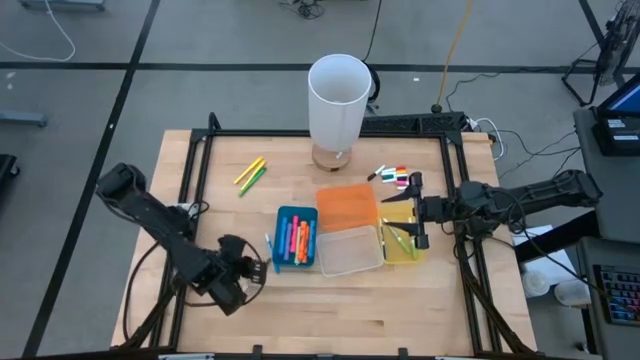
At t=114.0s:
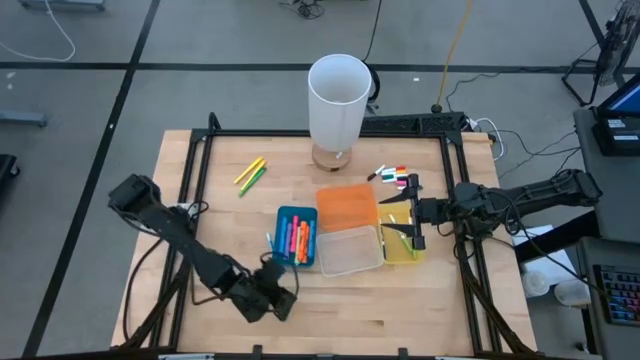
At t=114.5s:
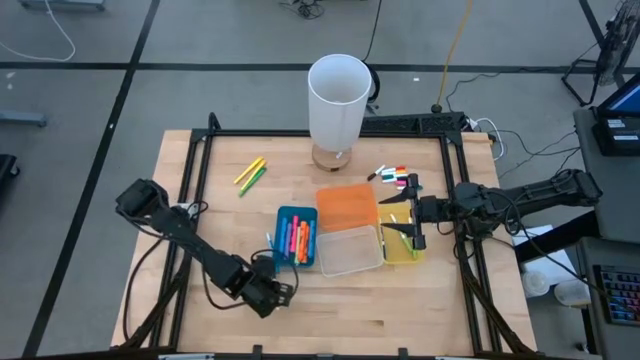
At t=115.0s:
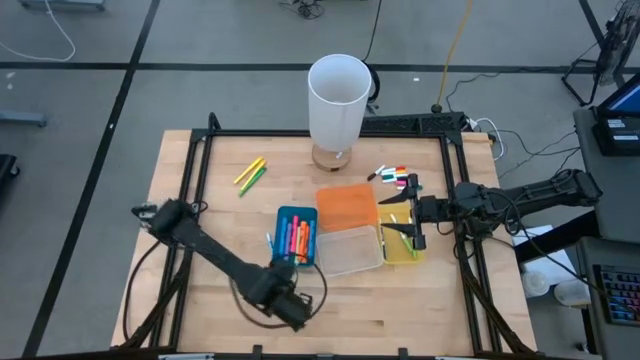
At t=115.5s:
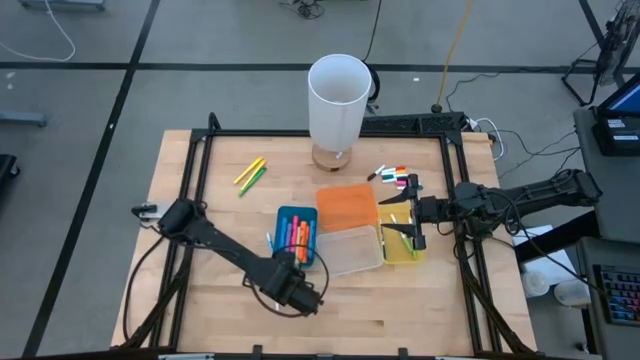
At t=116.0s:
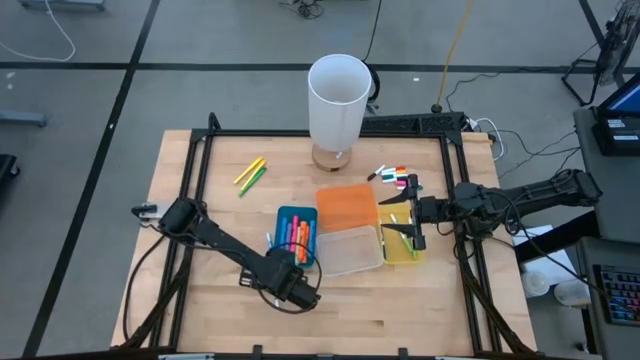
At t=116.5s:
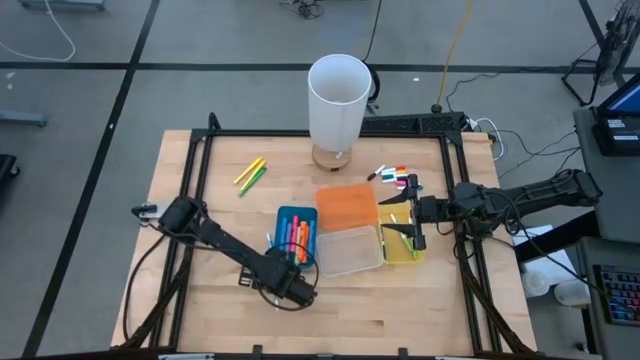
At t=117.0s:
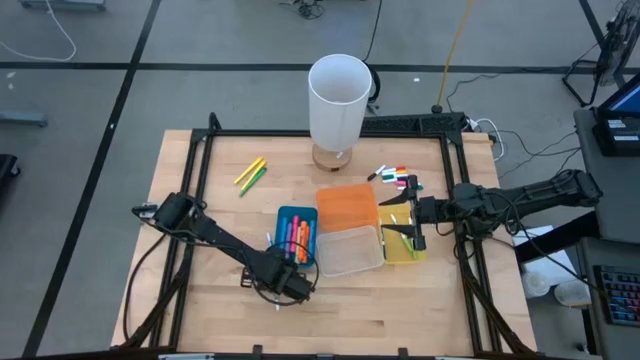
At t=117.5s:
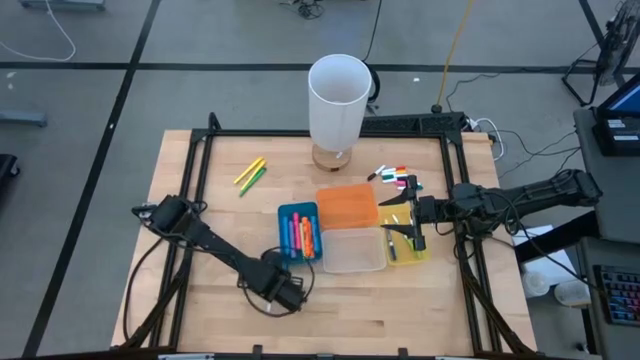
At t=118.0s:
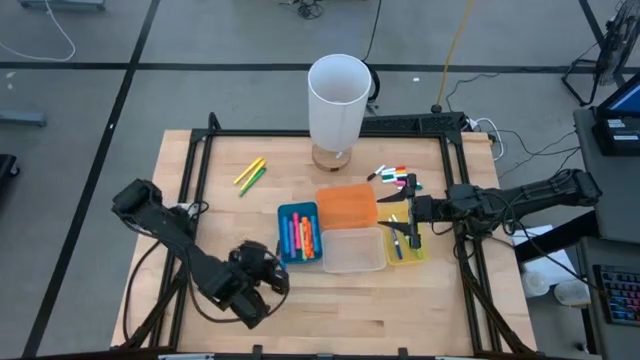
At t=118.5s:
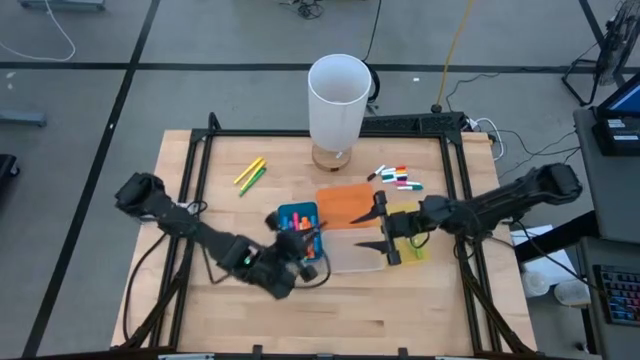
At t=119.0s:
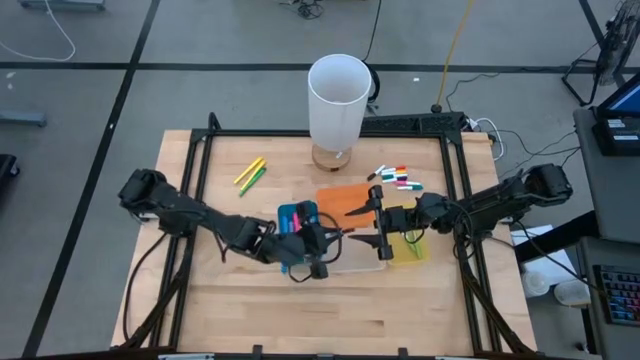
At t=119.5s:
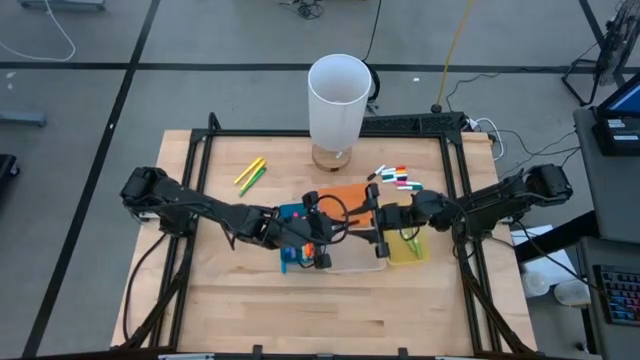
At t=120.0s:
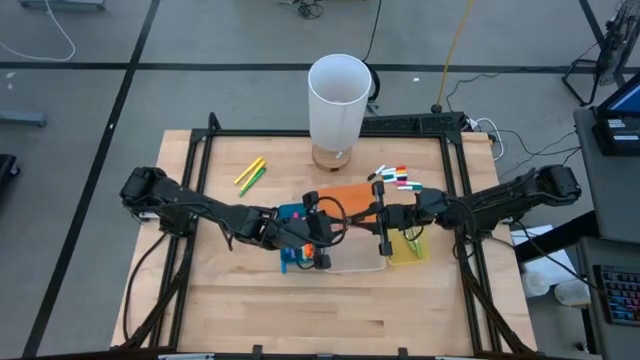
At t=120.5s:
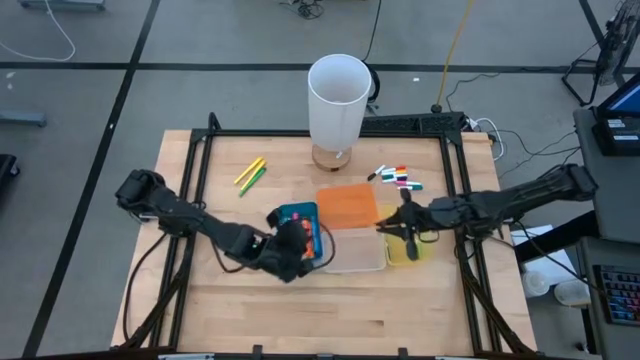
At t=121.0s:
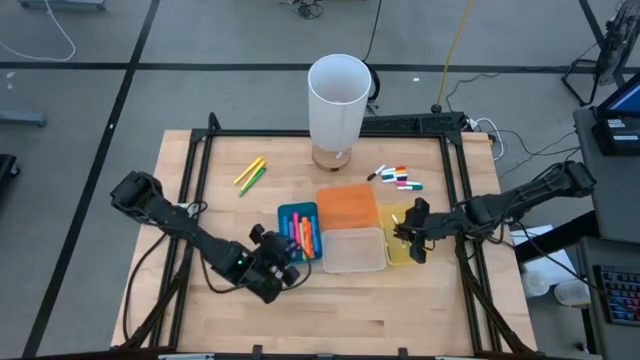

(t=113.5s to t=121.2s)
Task: Pick & Place Markers
Put the brown marker pen into the yellow bin

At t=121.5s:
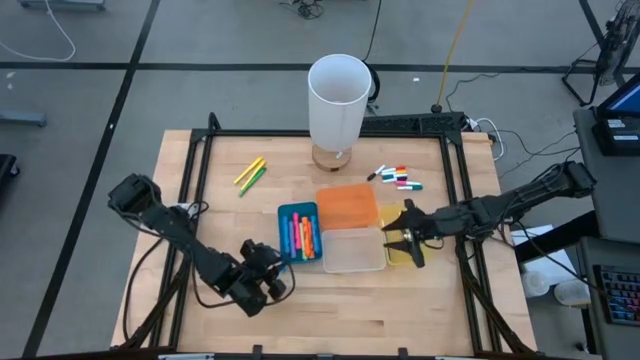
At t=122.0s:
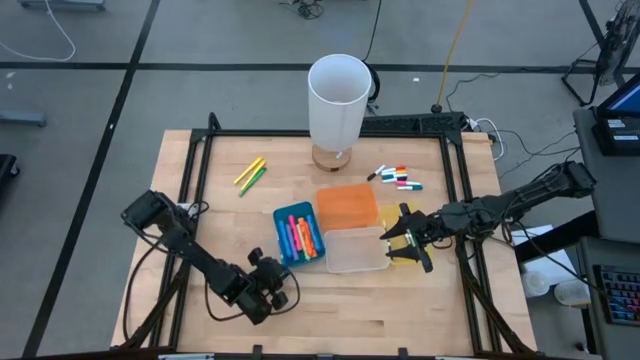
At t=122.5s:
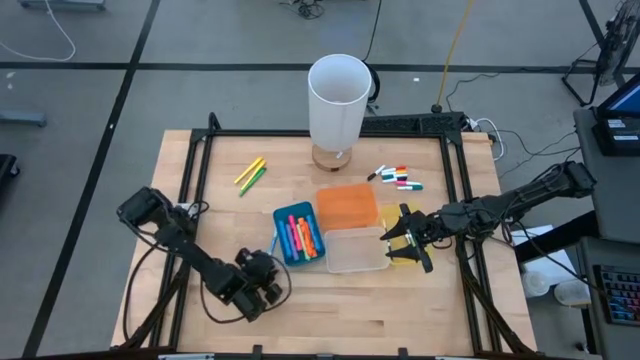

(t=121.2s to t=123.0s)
Put the blue marker pen into the yellow bin

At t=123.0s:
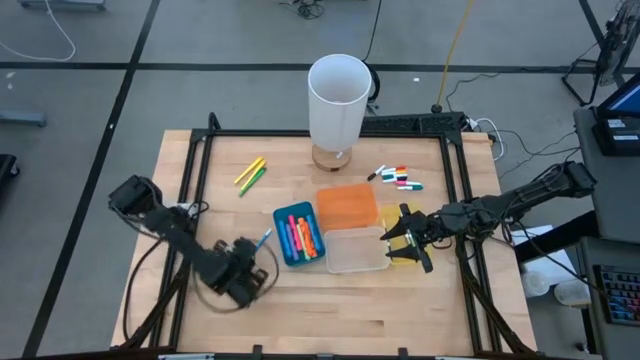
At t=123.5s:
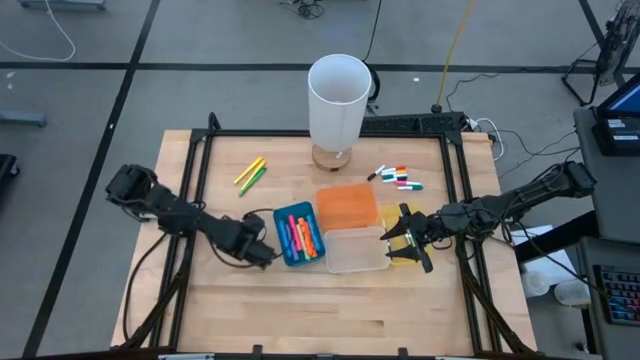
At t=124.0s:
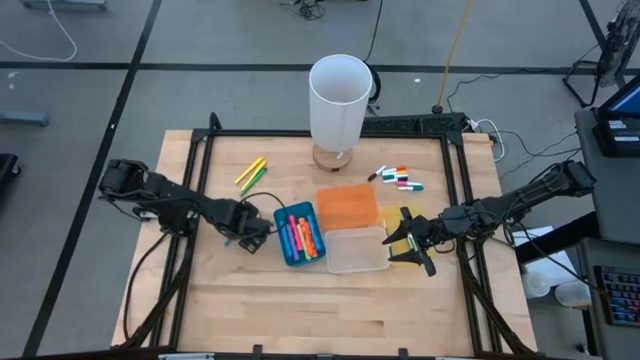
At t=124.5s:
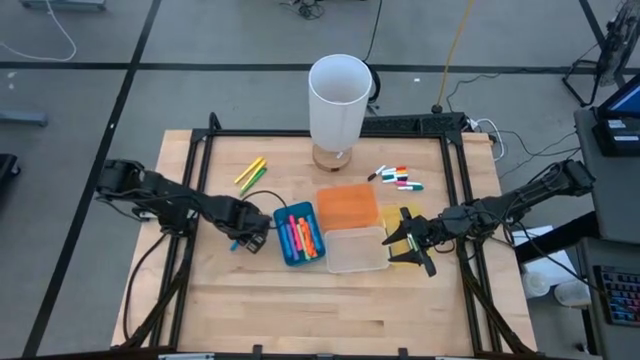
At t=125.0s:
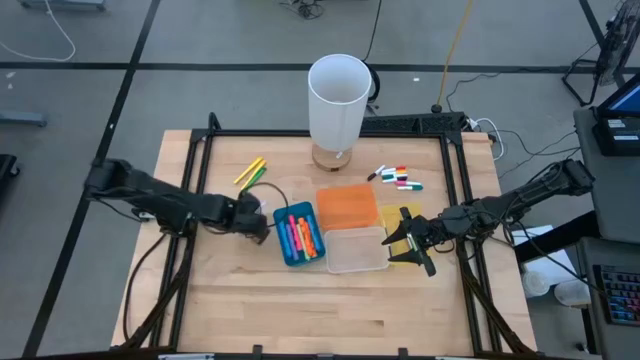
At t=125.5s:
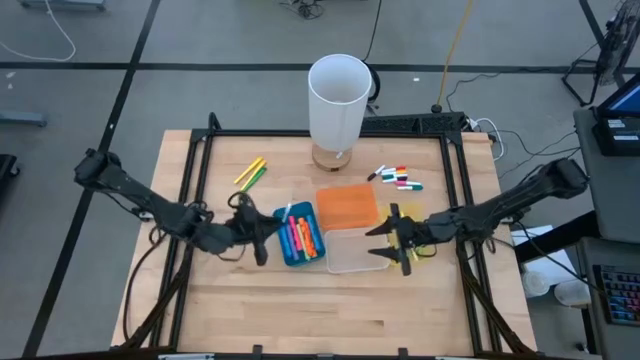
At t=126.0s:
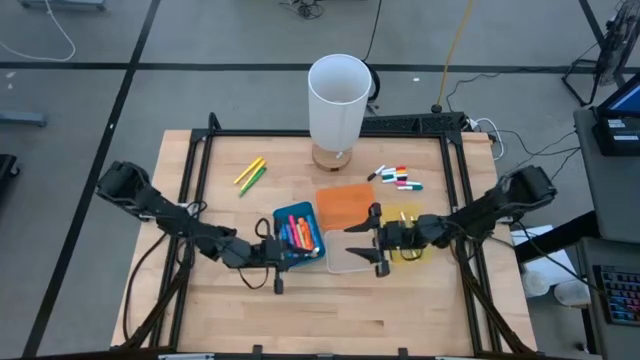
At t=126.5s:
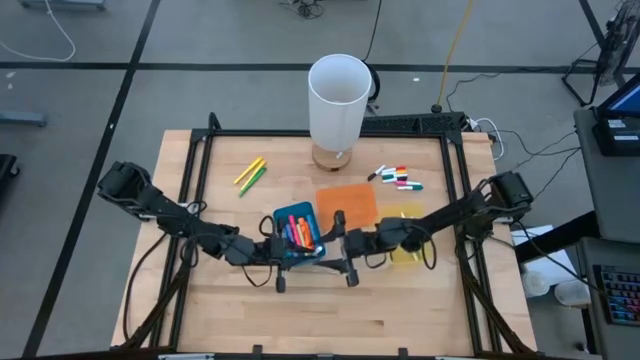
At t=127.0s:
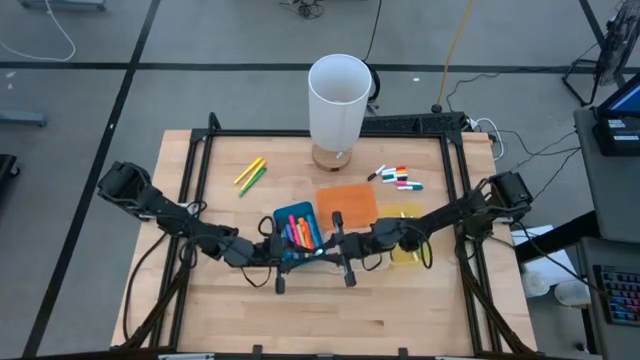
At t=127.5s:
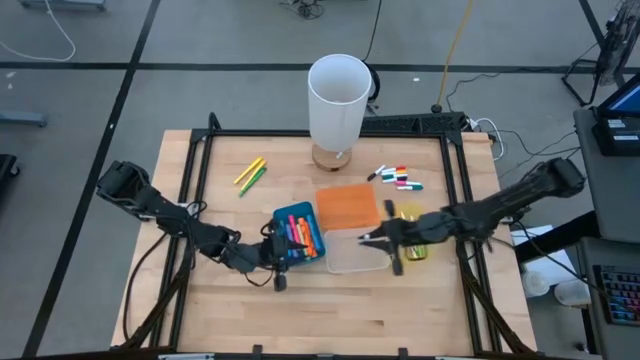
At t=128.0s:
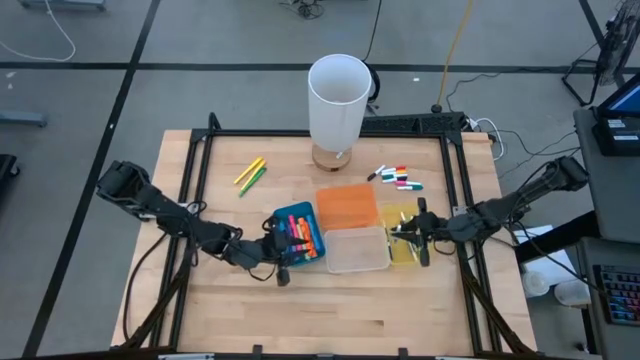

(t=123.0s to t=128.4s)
Put the blue marker pen into the yellow bin

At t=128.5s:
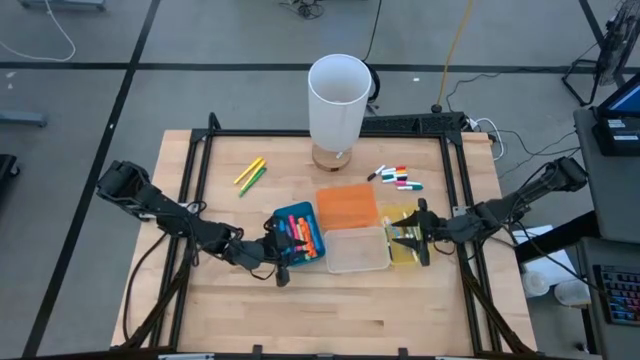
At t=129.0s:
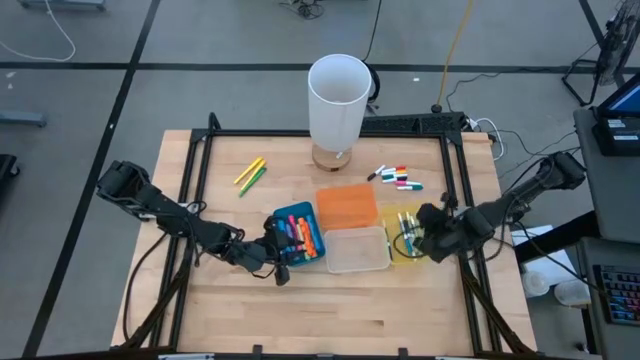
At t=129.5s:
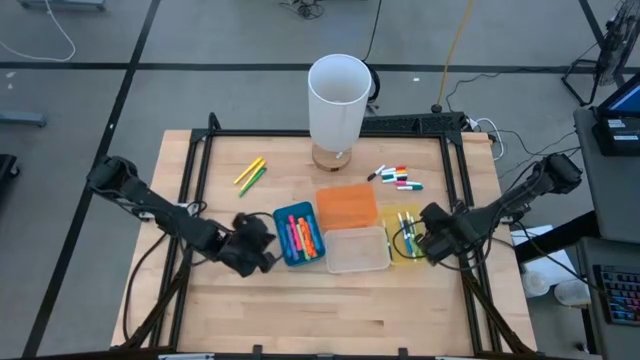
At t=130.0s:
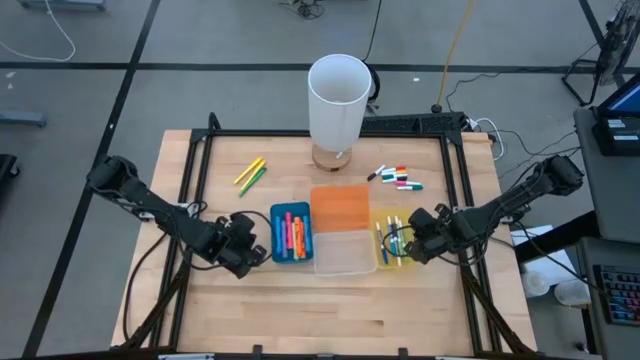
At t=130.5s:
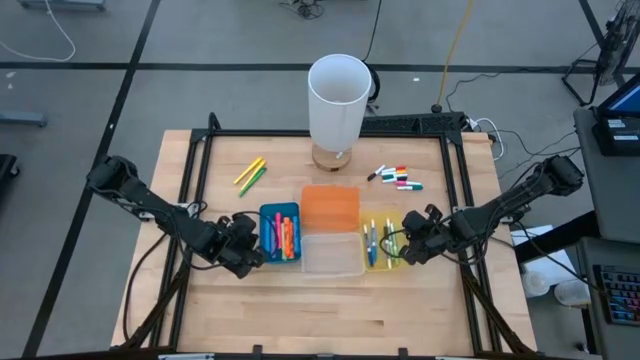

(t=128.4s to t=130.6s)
Adjust the bins on the table

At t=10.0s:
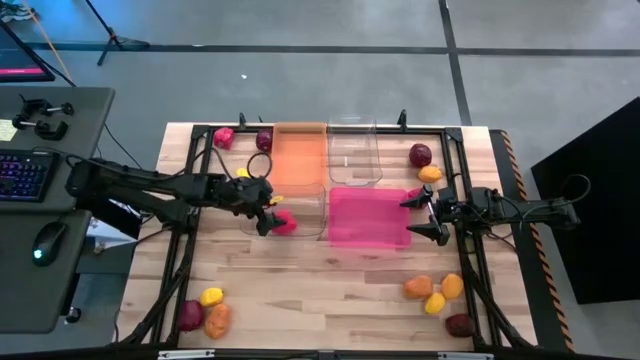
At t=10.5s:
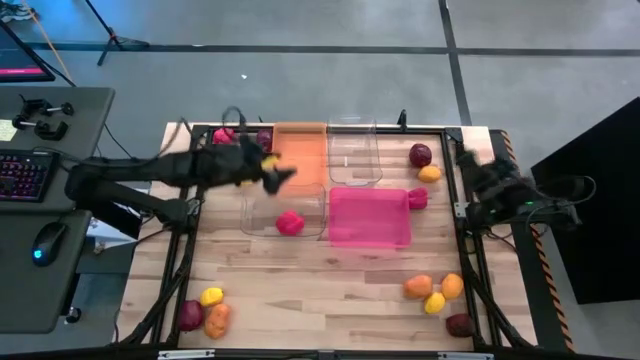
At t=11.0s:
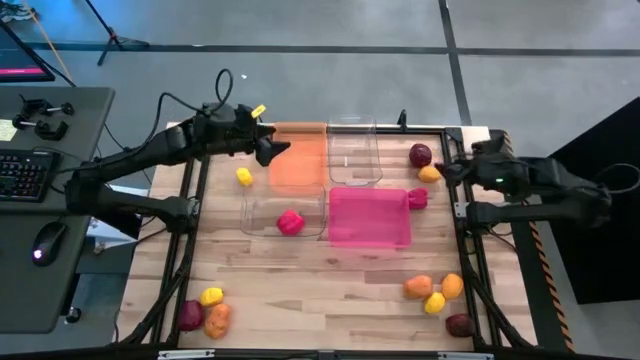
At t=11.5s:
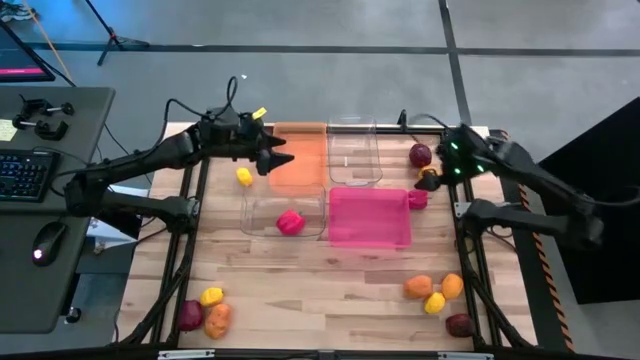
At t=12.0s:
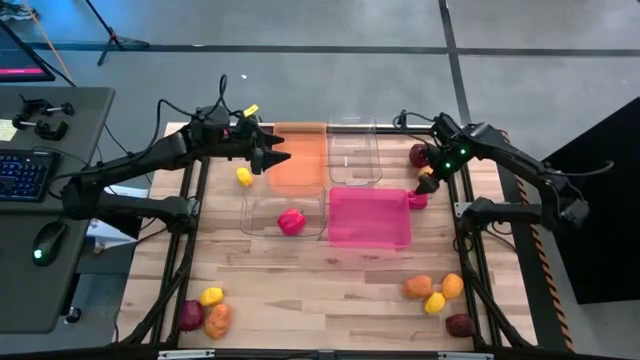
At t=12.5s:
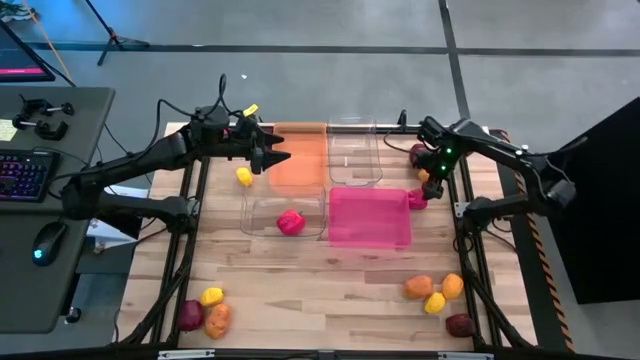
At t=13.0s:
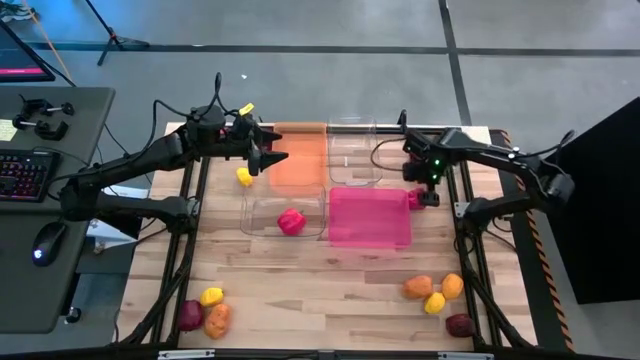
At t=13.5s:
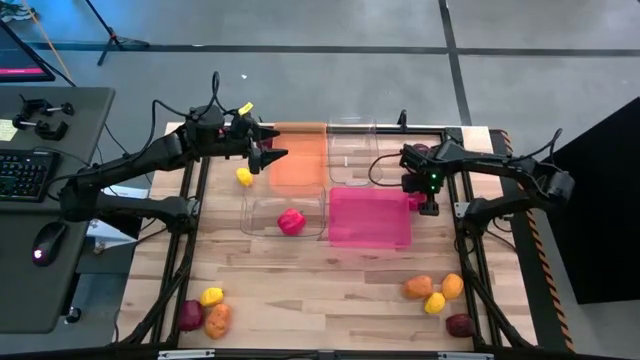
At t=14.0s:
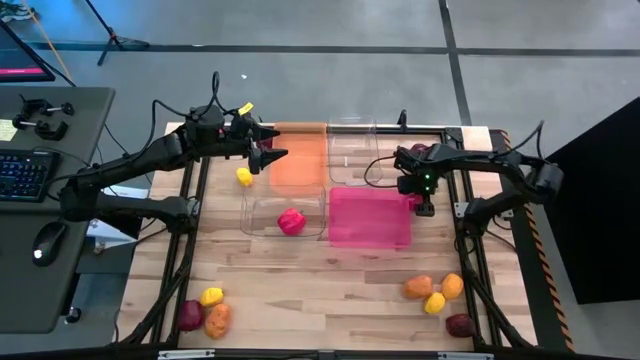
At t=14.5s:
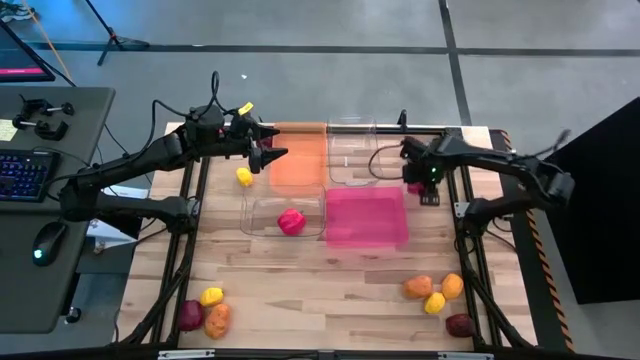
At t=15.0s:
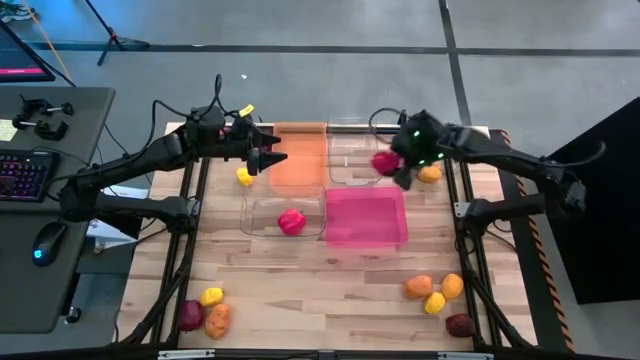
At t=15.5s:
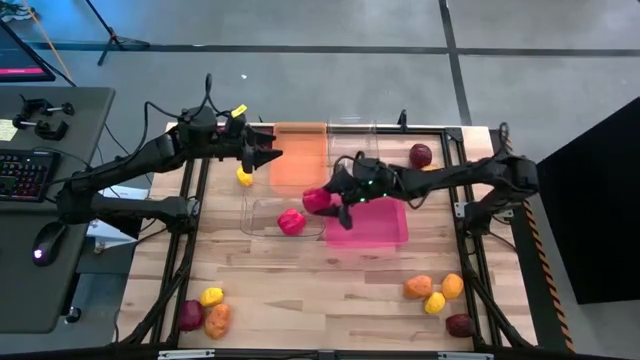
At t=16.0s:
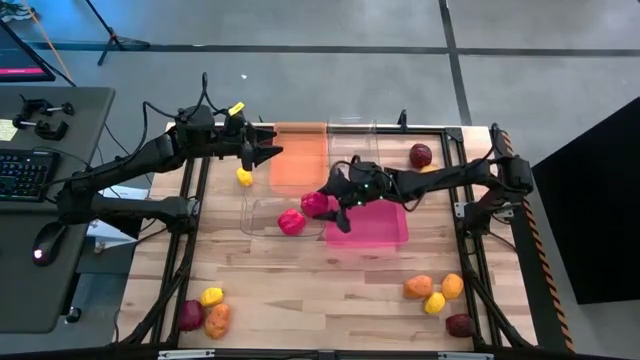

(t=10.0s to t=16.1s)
Task: Sort produce into baskets
Put the red bell pepper into the left transparent bin
